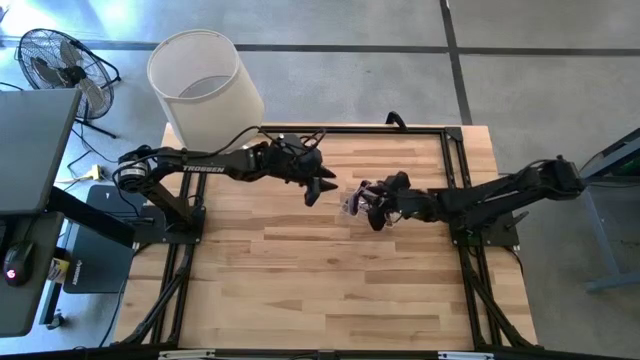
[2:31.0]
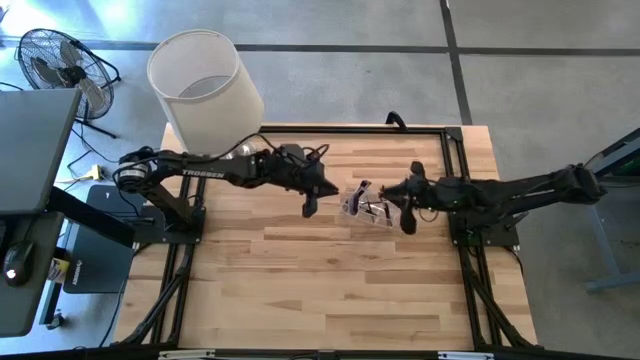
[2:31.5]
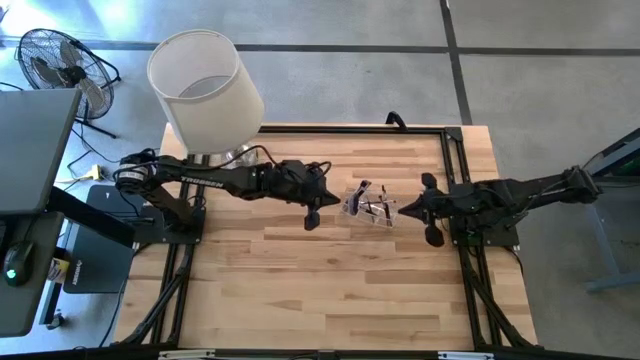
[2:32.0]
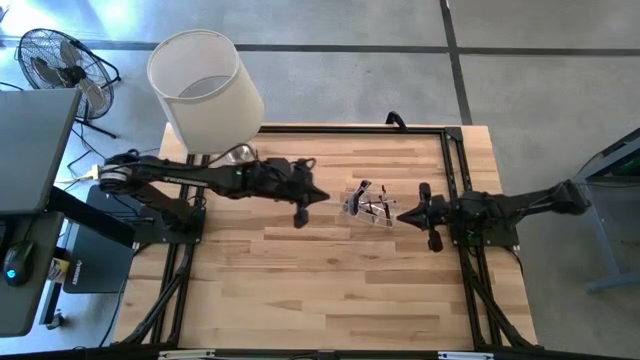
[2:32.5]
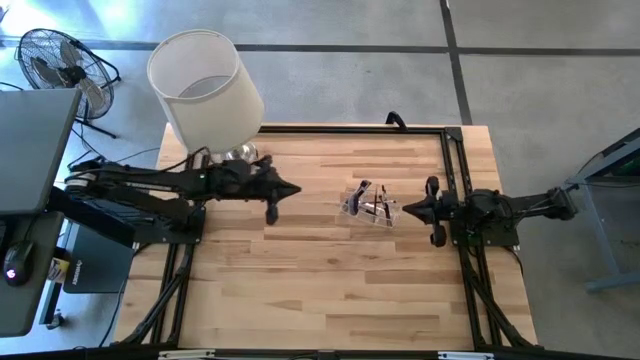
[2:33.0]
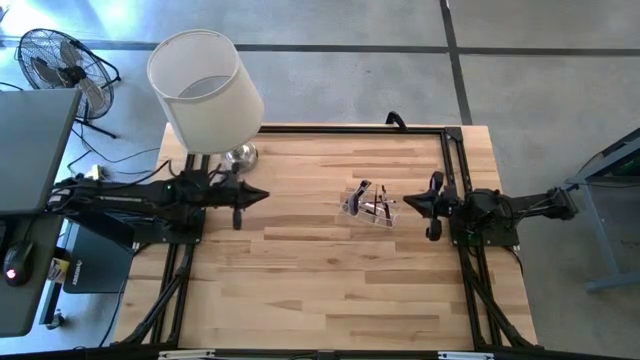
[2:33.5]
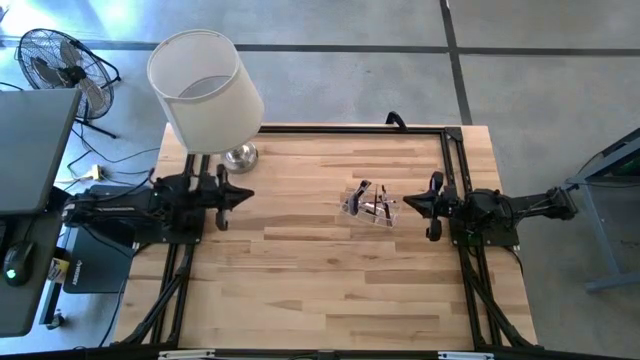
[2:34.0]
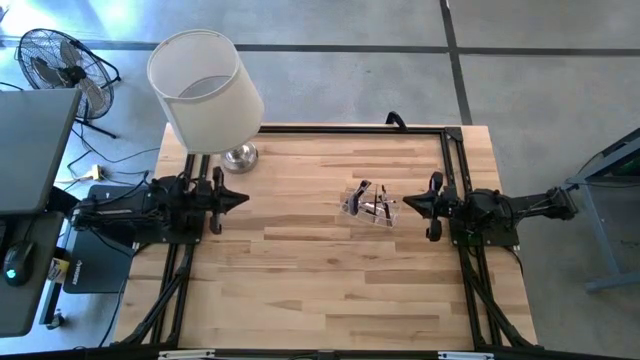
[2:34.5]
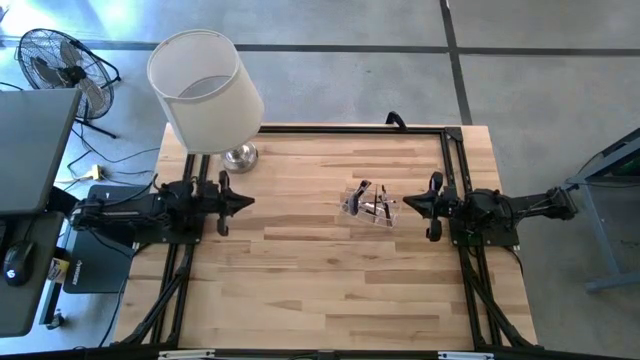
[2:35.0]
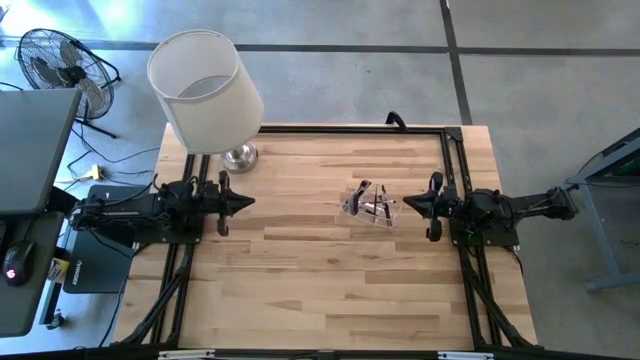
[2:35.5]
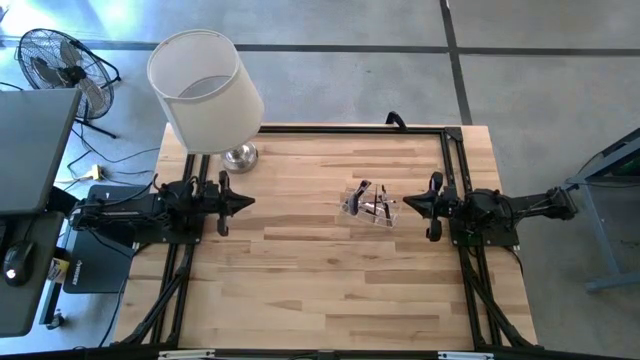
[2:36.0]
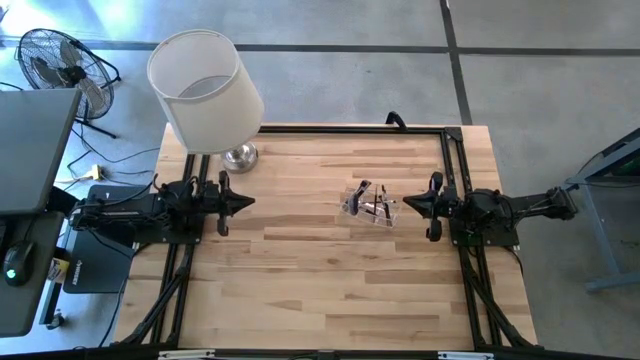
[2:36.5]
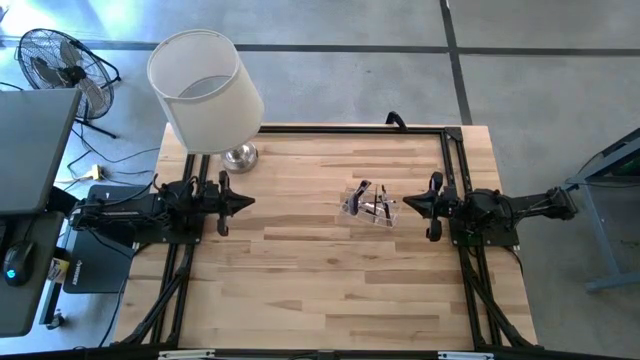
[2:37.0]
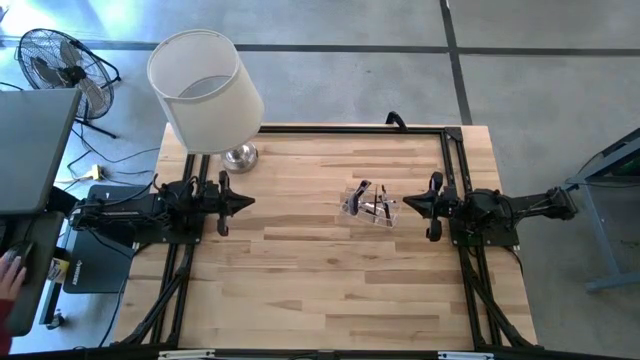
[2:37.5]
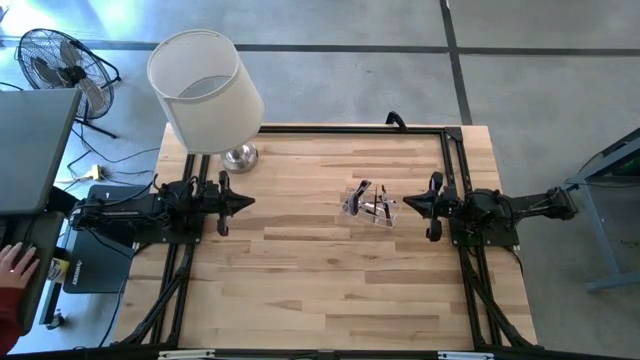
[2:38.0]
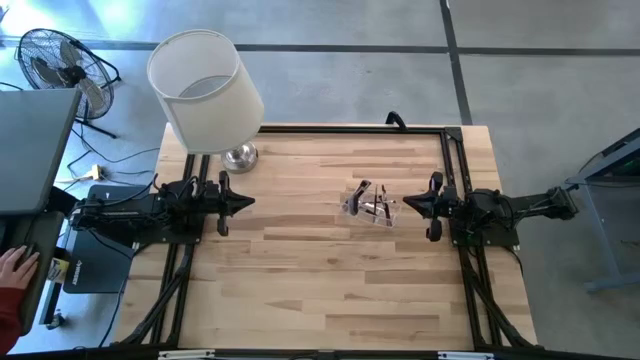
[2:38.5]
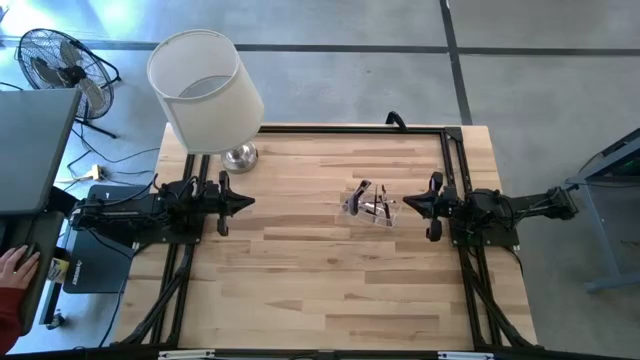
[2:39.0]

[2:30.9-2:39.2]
Task: Put items in baskets/containers
Return to Home Position

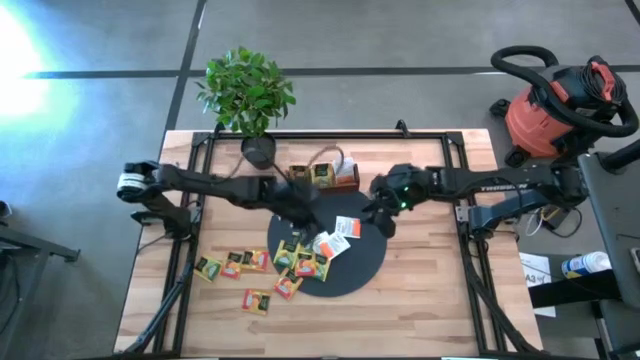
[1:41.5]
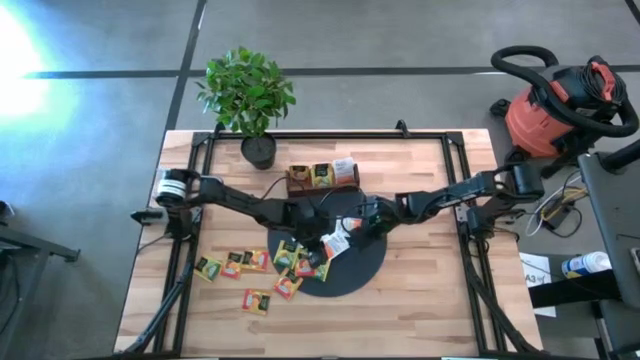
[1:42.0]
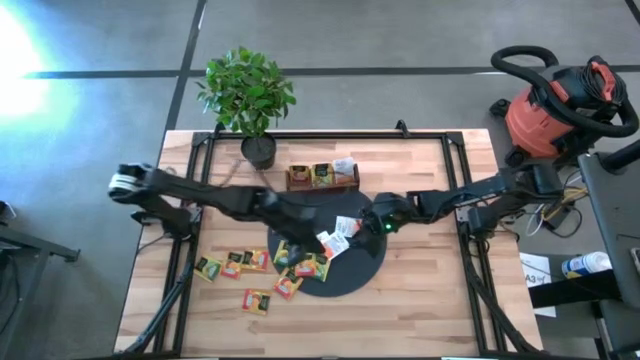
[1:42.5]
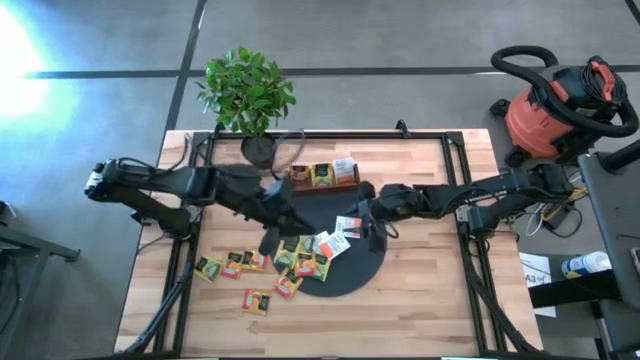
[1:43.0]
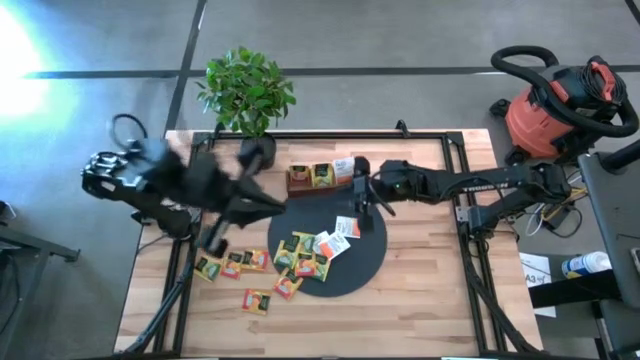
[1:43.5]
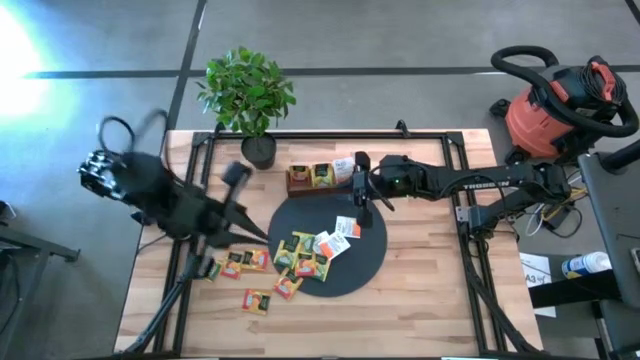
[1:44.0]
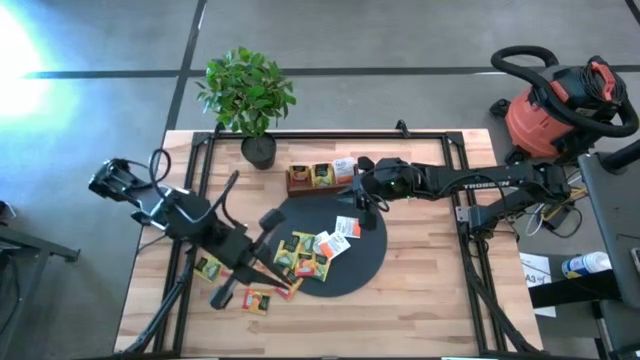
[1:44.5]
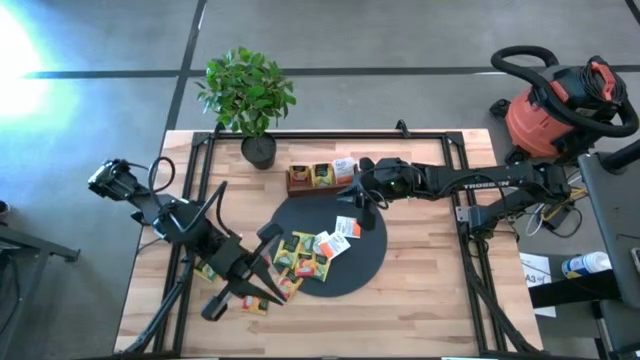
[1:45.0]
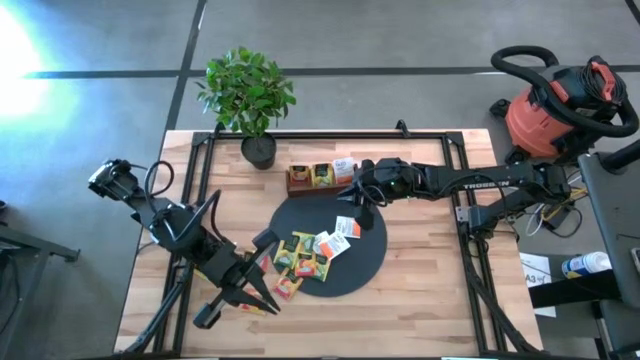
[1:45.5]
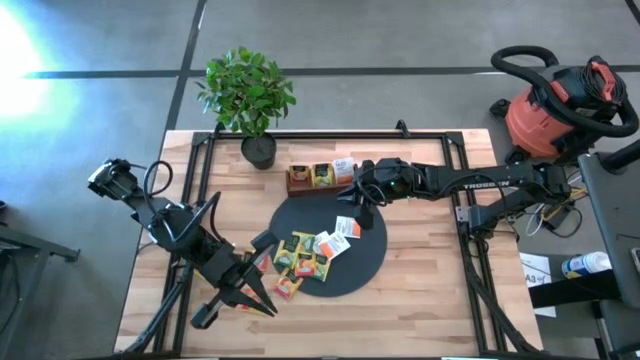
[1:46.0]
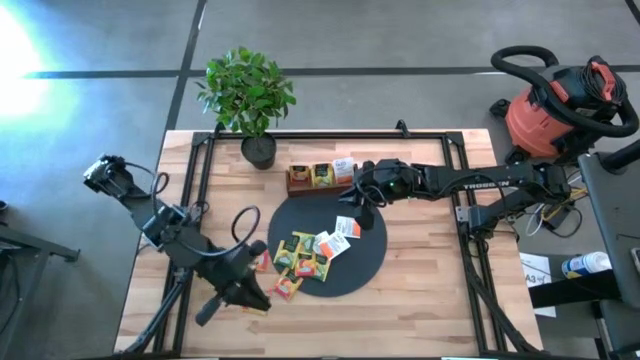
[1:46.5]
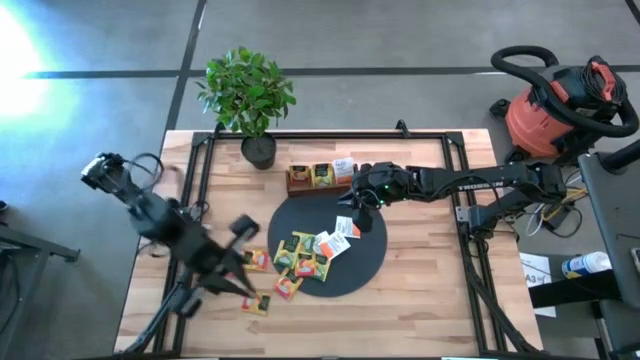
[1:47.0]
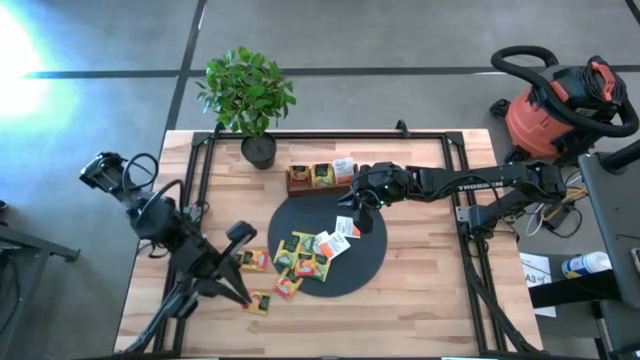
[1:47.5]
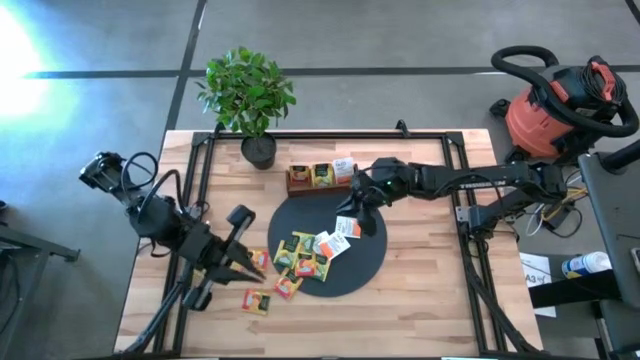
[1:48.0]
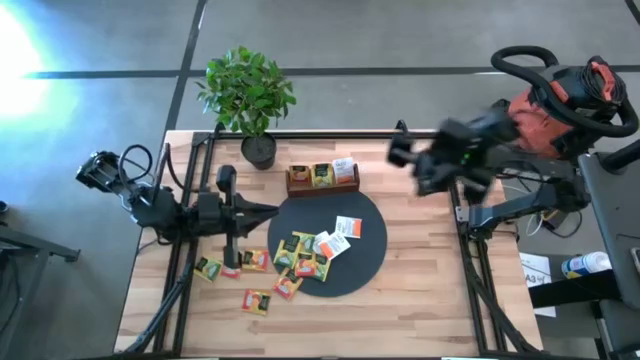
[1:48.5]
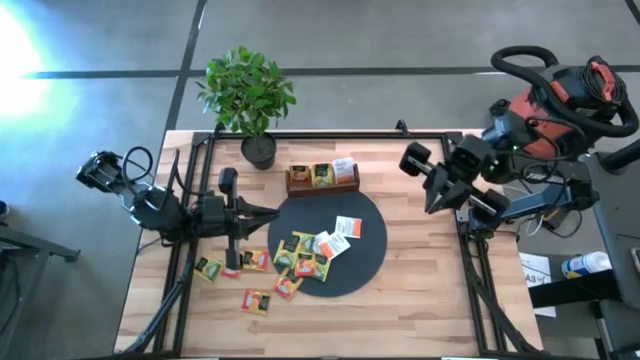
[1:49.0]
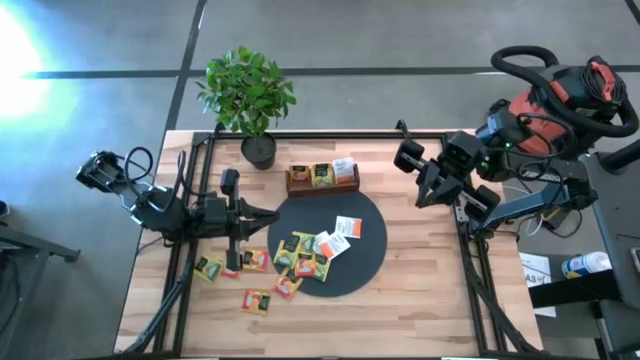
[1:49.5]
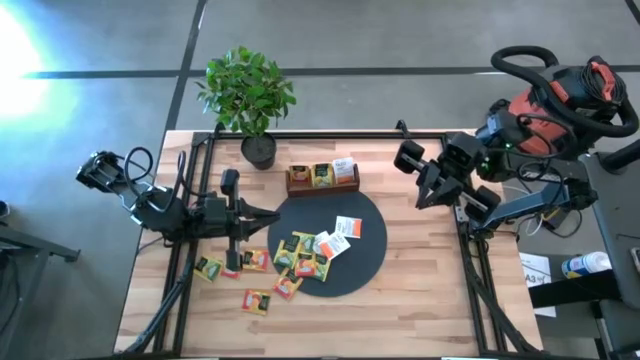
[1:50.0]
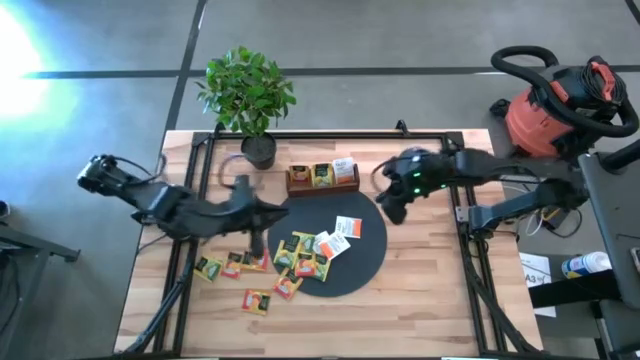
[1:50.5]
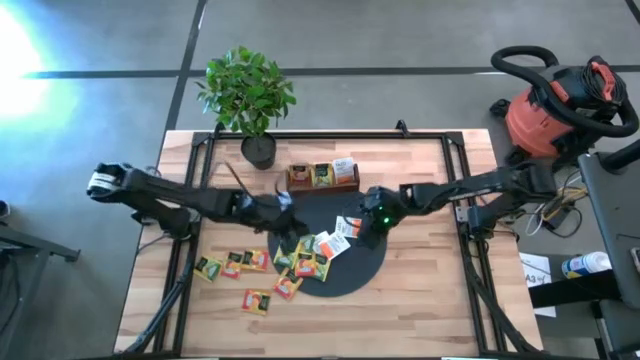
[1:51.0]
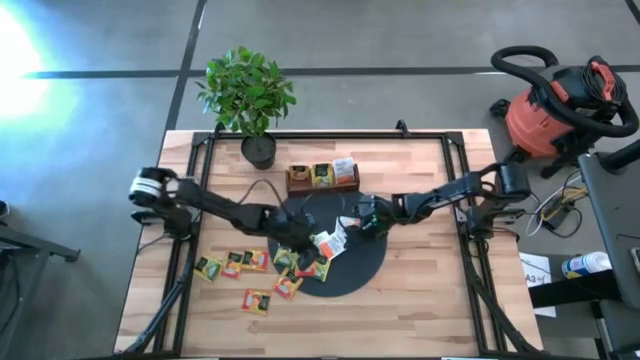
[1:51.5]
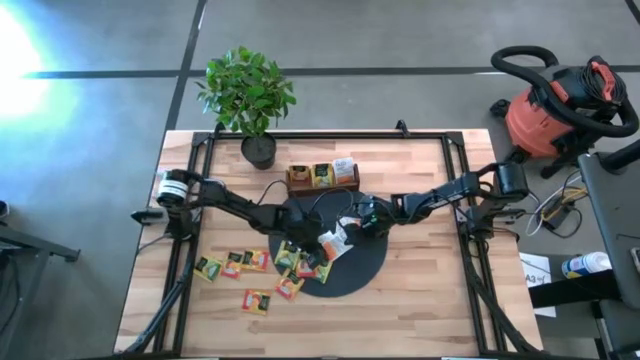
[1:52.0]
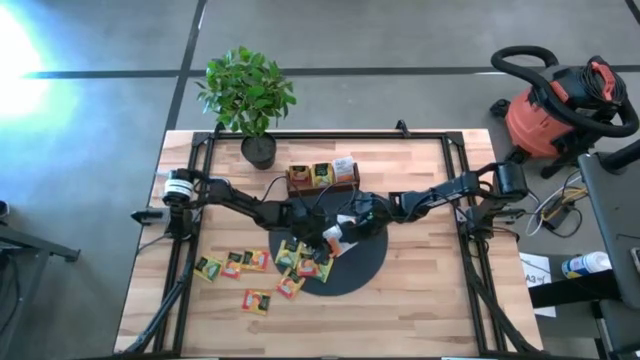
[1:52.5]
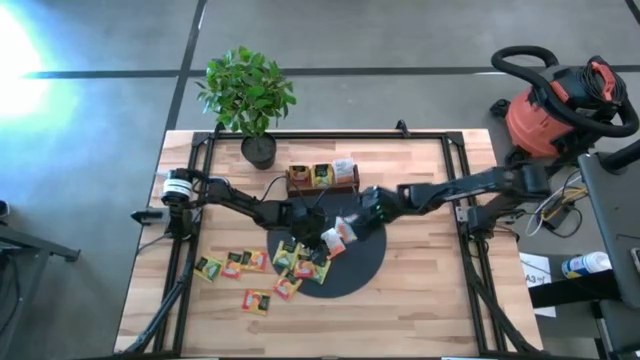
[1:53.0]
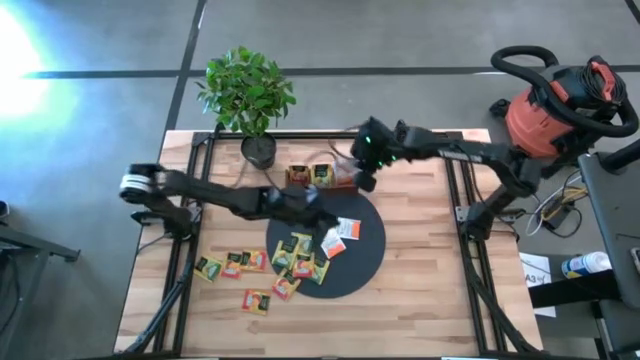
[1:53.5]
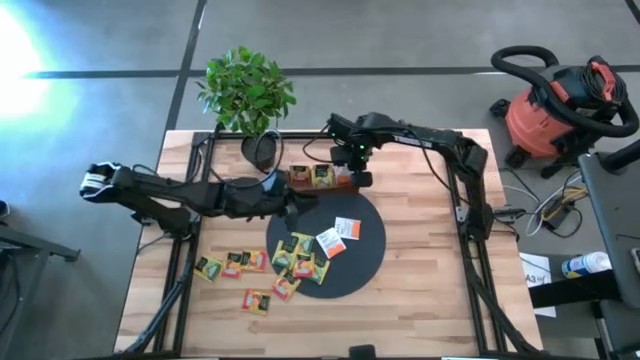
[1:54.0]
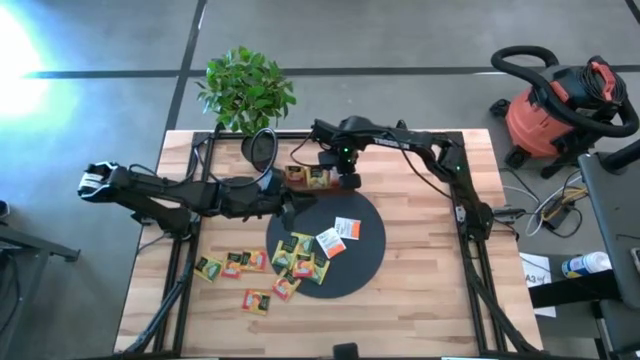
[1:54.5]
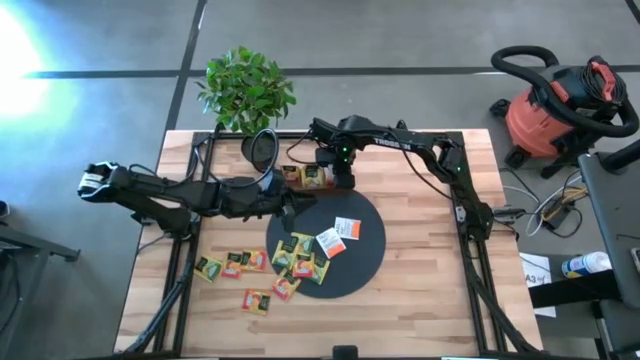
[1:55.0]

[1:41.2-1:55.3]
Task: Pick & Place Tea
Put the middle white tea bag into the right slot of the wooden organizer
